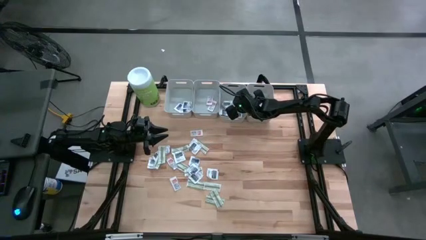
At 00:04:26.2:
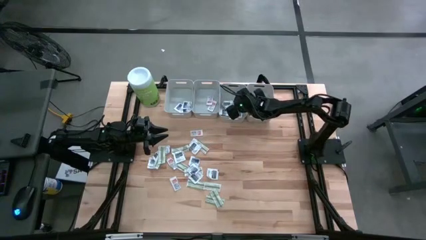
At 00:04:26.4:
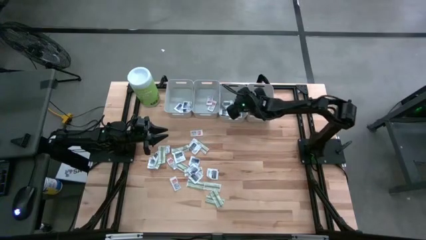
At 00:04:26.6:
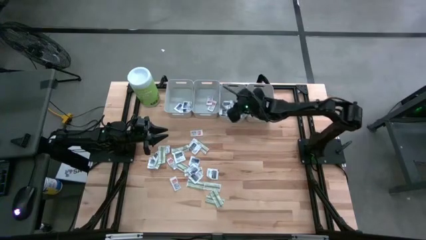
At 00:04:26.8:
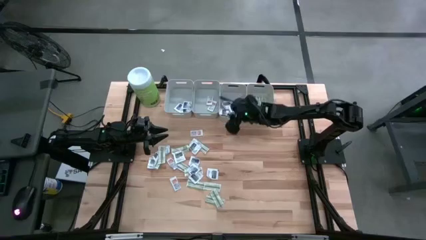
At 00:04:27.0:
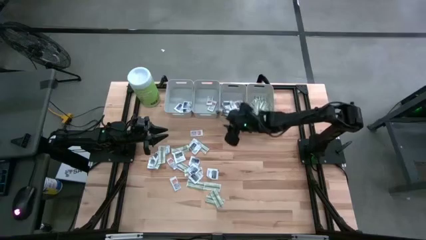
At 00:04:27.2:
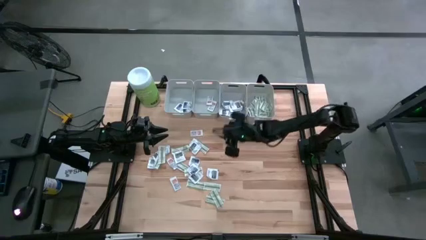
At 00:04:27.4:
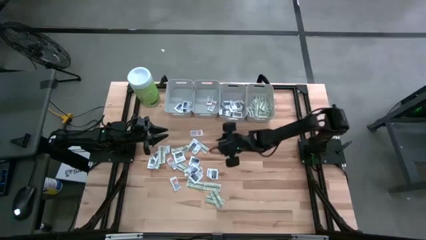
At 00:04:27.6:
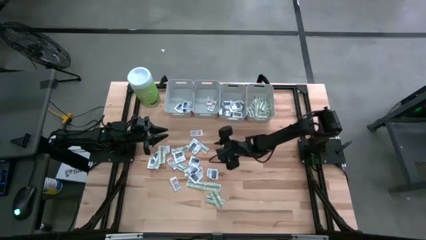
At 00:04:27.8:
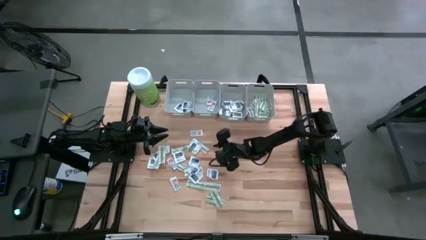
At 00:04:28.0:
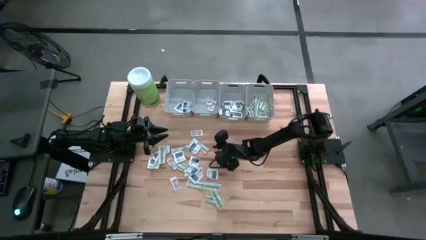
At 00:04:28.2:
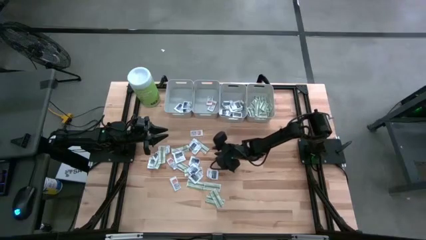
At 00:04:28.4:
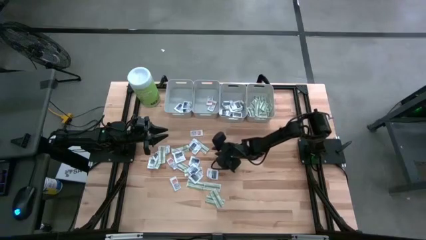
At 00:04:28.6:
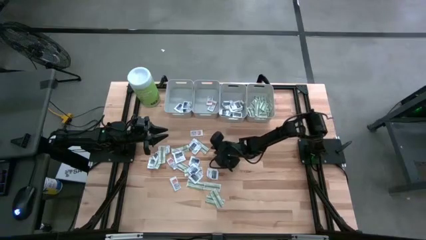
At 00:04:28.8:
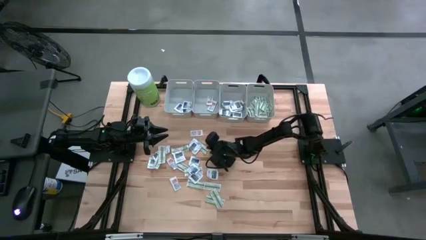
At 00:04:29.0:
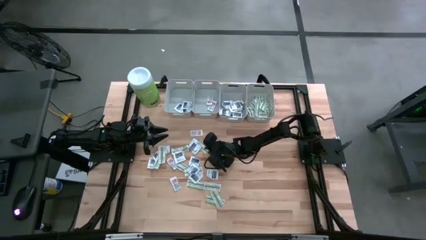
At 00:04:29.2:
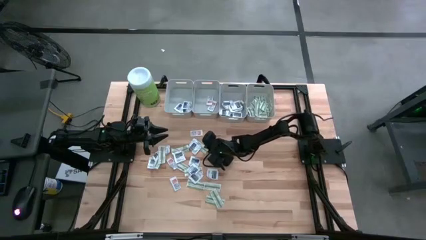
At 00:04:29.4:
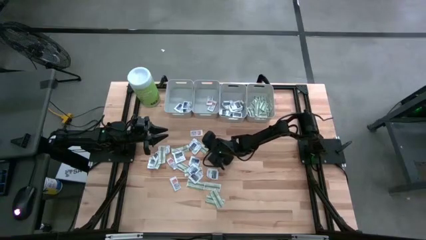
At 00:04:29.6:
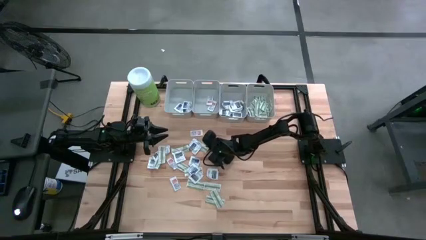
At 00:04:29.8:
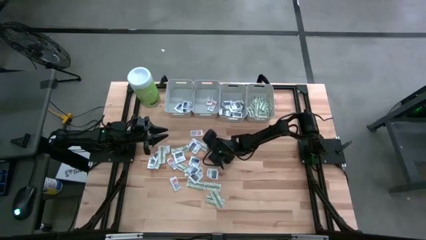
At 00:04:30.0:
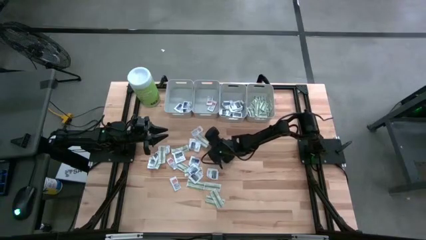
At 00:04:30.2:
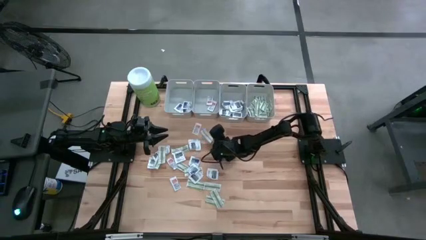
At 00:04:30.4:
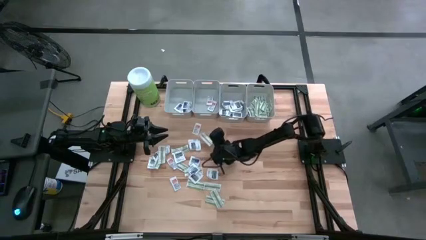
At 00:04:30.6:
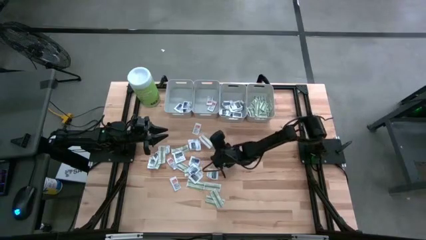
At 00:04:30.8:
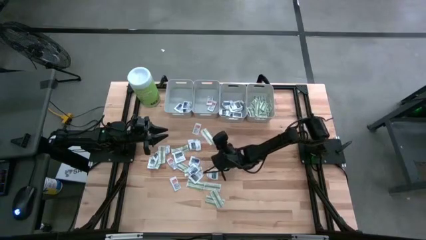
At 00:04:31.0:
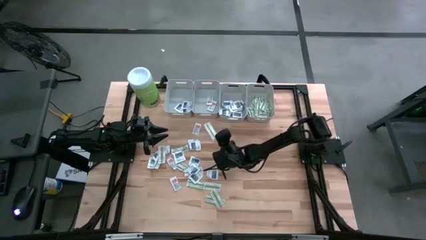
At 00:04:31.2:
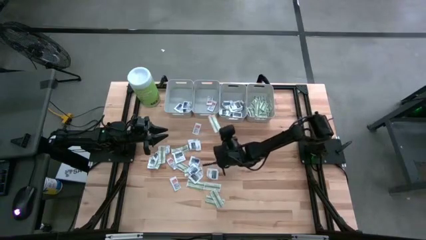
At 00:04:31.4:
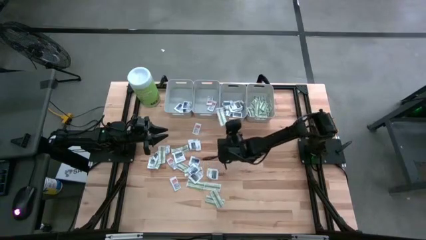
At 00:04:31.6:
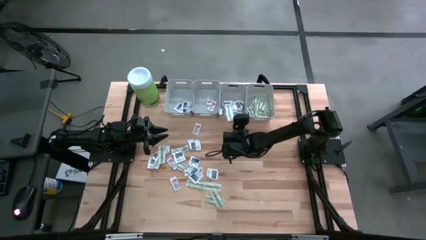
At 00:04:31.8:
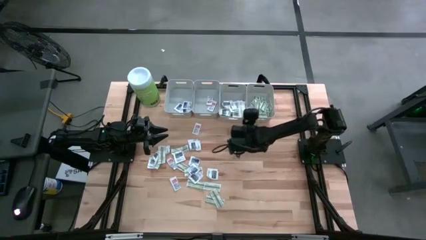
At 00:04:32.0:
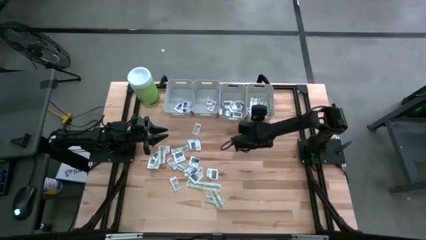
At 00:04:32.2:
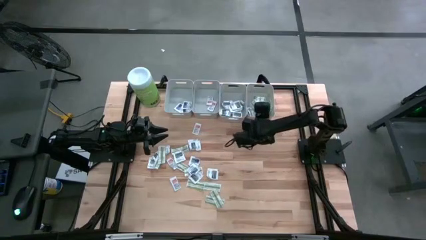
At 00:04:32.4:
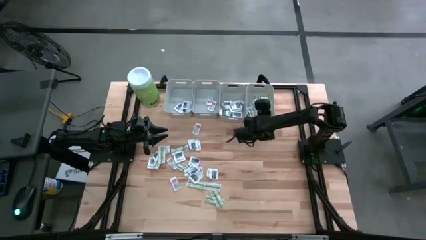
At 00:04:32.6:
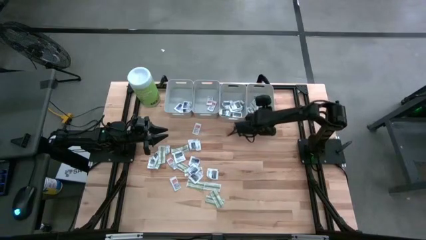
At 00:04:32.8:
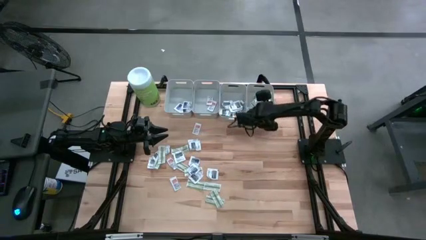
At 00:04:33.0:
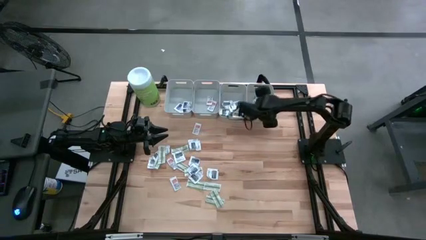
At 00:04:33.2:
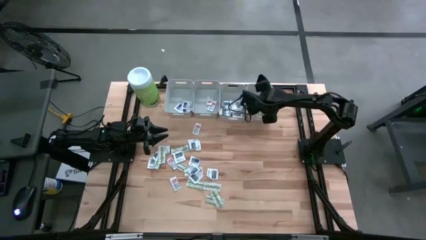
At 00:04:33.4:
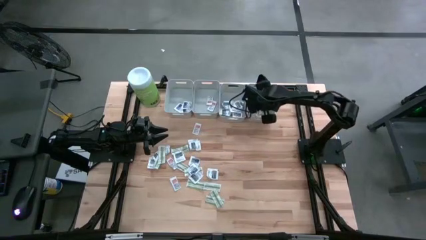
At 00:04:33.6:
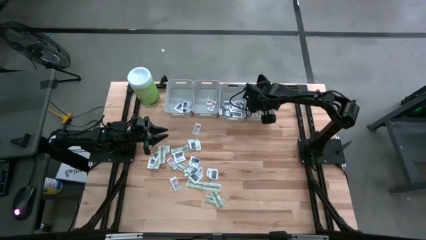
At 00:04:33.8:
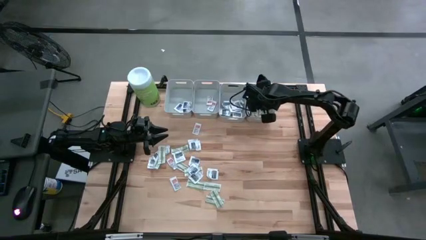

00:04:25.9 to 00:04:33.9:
Task: Pick & Place First Aid Supplies
Put the bandage into the right gray bin

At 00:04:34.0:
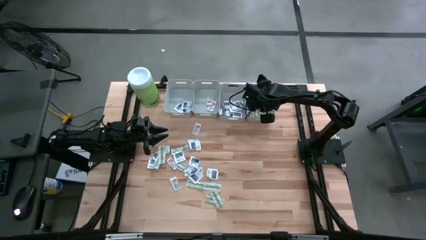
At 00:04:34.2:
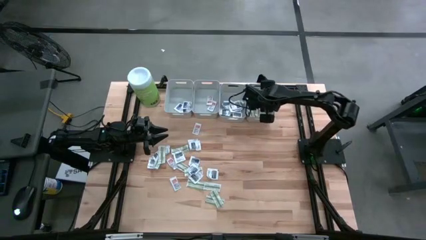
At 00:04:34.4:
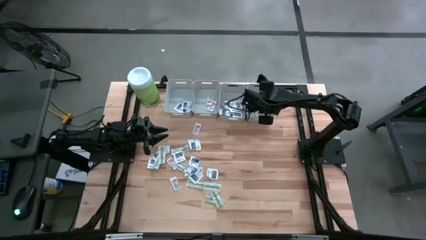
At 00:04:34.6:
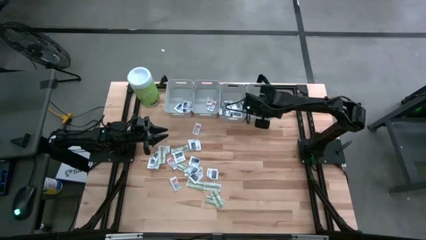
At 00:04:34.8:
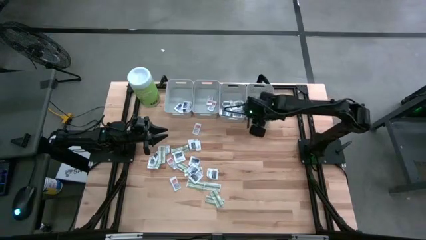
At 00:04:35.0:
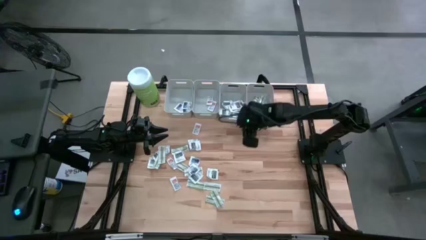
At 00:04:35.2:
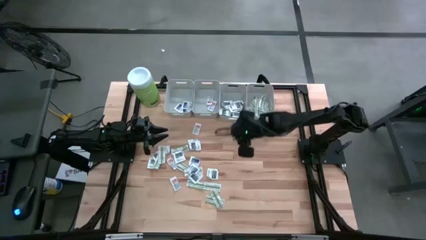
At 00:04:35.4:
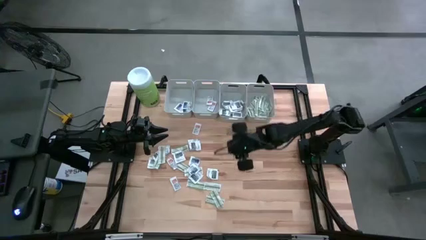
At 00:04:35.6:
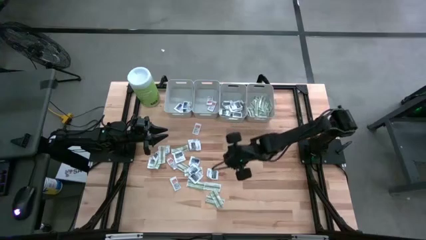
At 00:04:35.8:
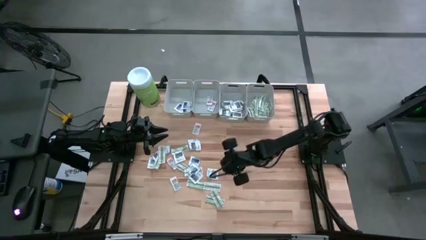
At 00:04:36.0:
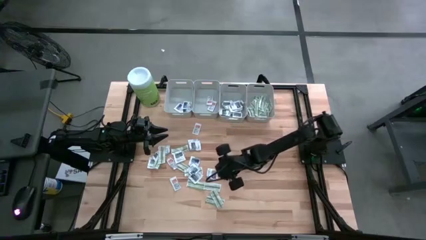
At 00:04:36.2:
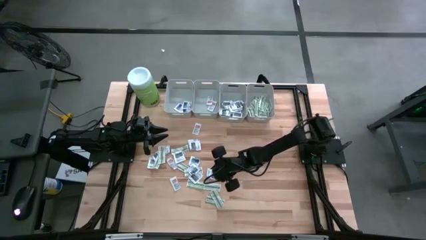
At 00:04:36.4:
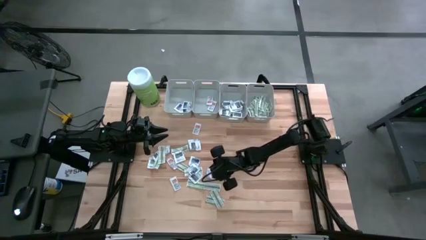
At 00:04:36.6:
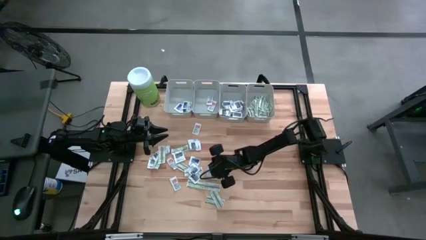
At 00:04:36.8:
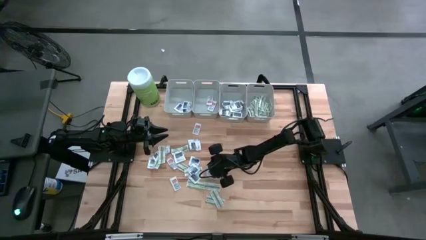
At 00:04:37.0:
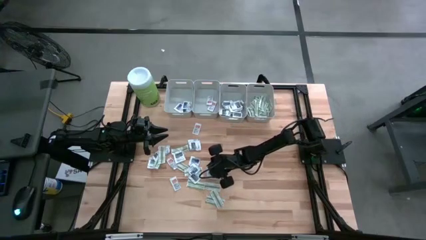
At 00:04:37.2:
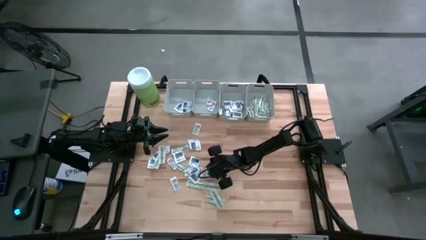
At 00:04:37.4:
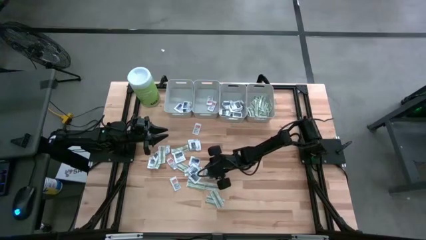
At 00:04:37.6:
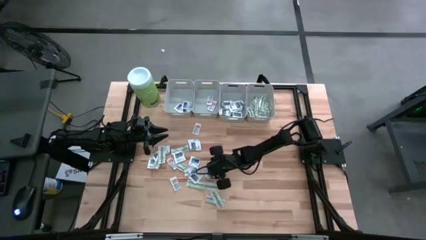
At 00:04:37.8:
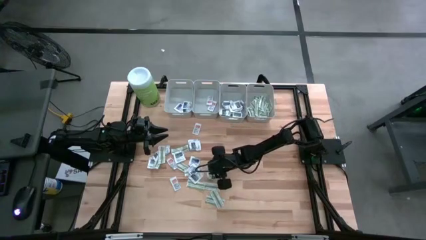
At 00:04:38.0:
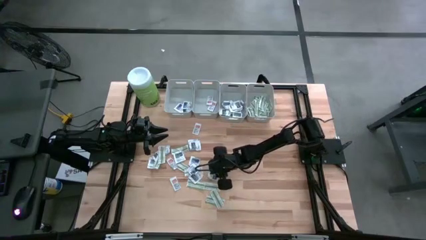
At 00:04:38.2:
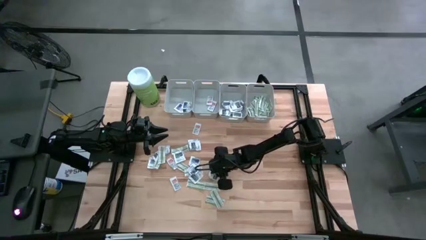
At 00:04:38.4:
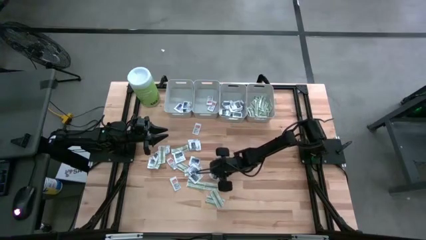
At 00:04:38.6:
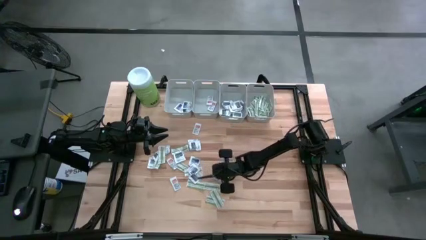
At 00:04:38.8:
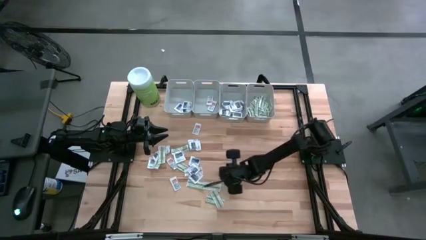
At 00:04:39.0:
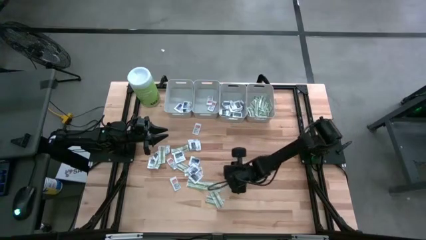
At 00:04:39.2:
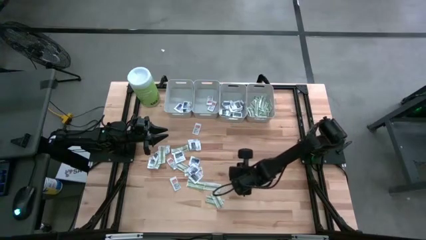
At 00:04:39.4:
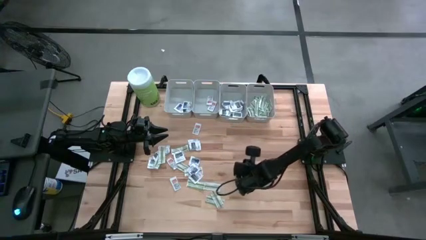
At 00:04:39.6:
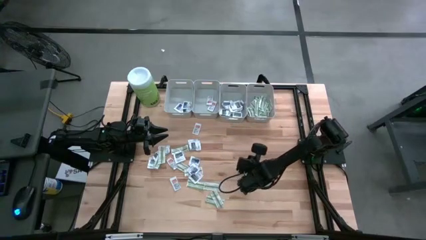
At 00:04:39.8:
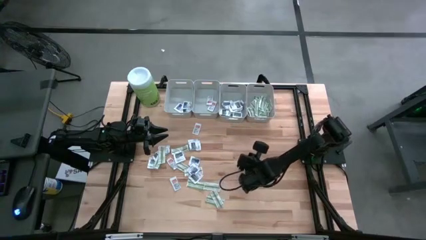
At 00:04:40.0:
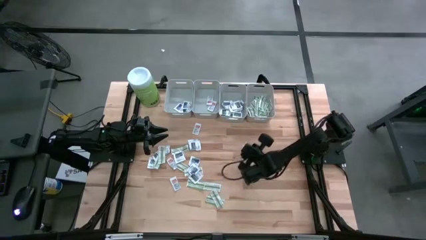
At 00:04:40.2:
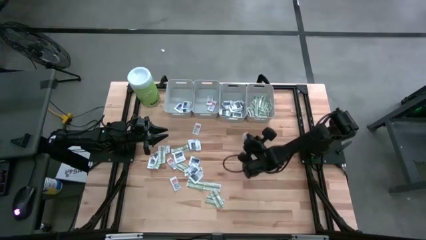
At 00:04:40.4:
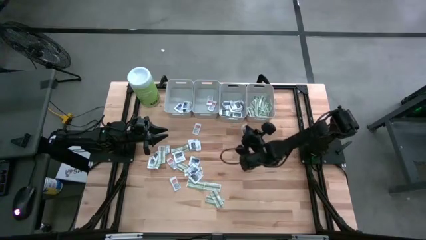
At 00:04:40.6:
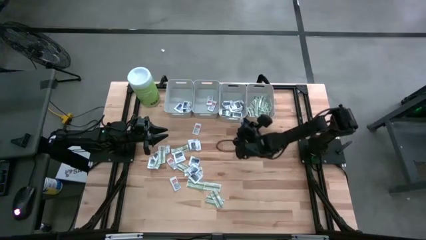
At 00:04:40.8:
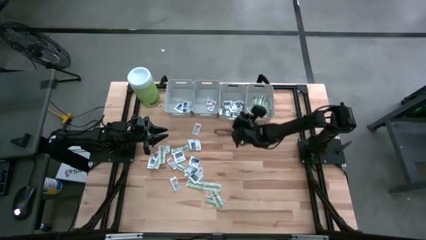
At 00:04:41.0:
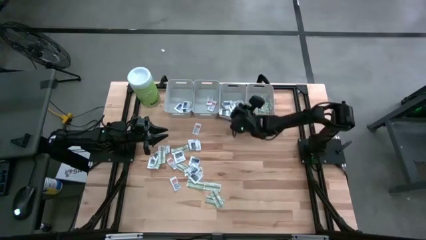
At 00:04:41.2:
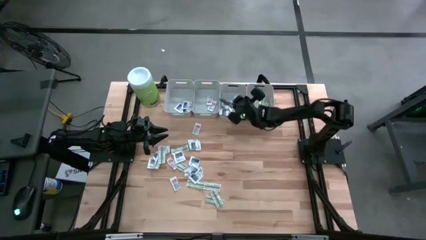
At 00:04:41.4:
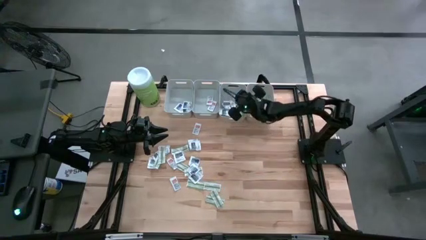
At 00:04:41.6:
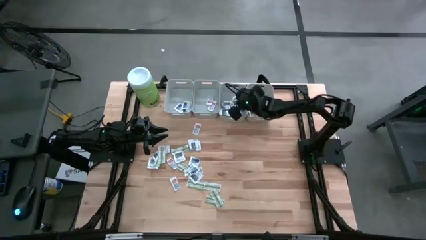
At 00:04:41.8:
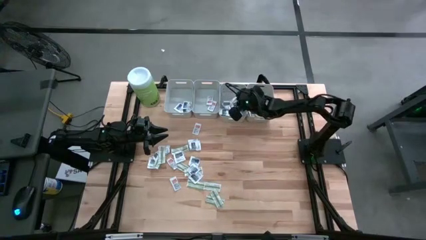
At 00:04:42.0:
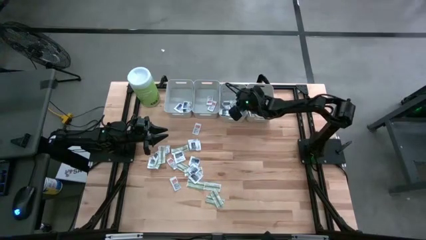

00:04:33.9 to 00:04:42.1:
Put the towelette pack into the middle right gray bin
